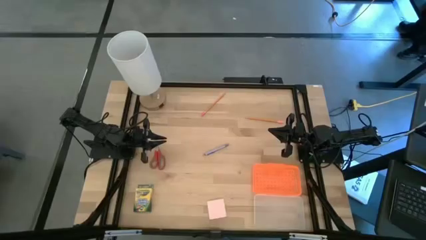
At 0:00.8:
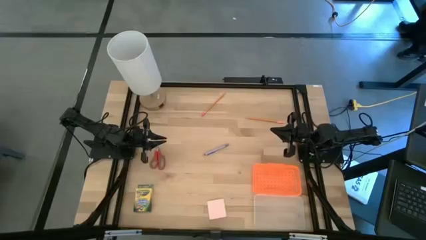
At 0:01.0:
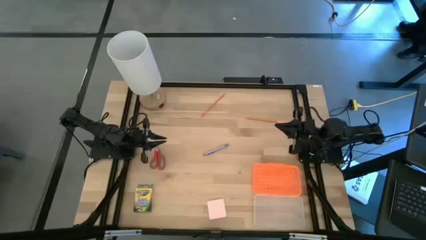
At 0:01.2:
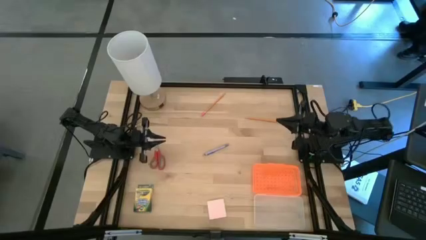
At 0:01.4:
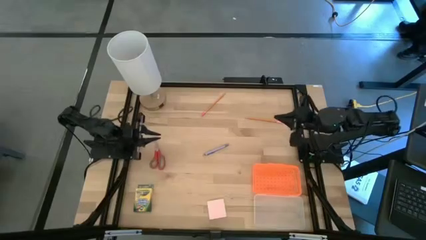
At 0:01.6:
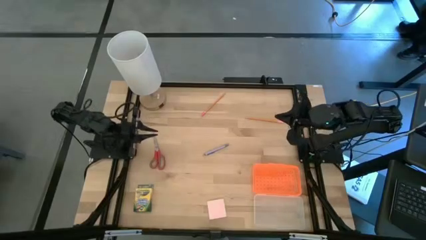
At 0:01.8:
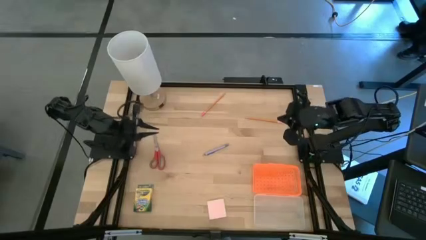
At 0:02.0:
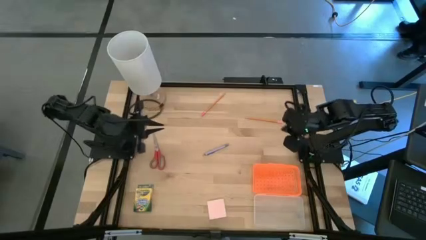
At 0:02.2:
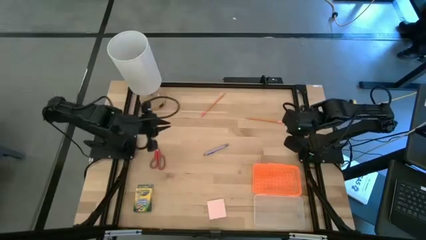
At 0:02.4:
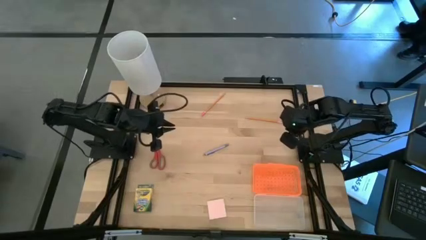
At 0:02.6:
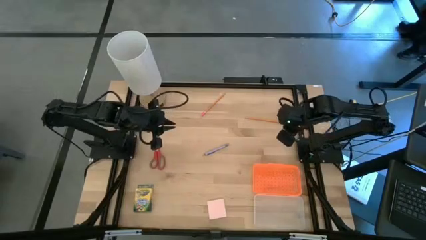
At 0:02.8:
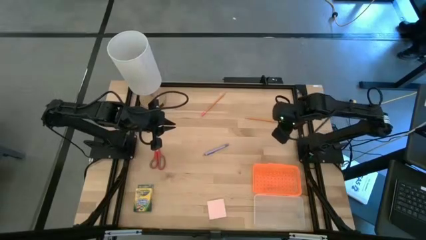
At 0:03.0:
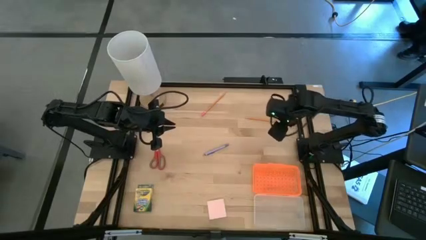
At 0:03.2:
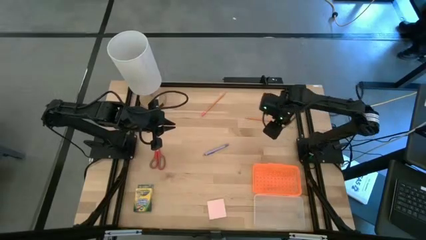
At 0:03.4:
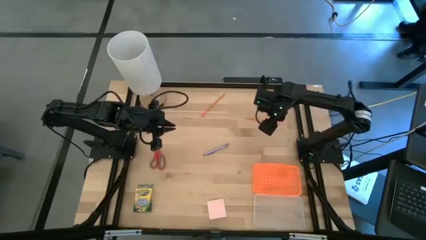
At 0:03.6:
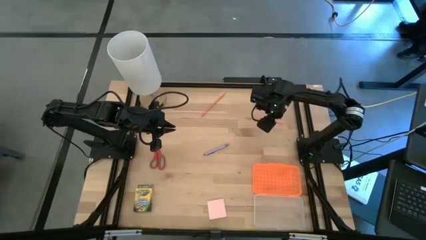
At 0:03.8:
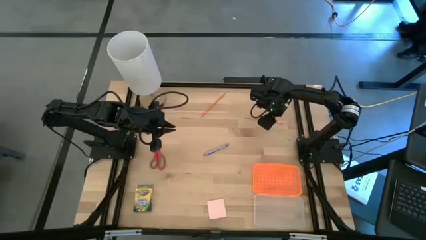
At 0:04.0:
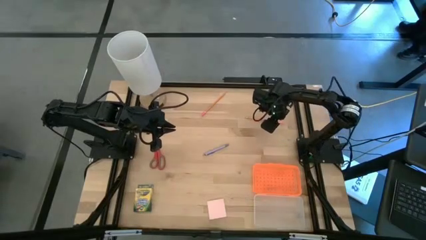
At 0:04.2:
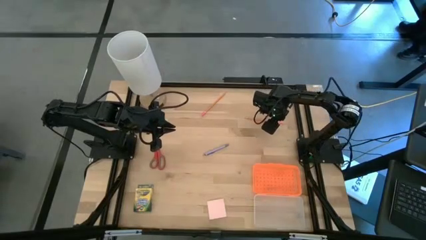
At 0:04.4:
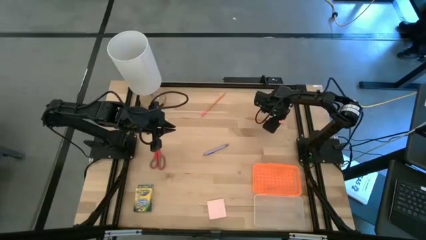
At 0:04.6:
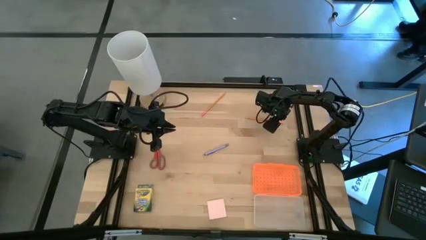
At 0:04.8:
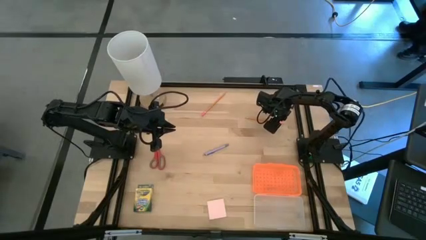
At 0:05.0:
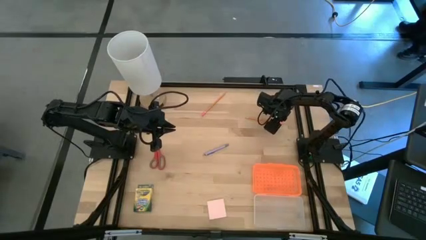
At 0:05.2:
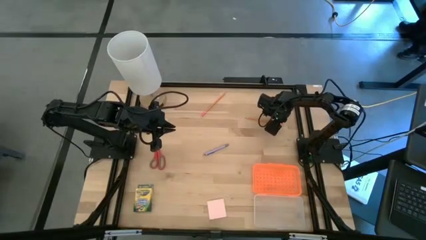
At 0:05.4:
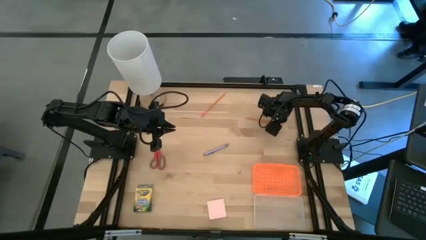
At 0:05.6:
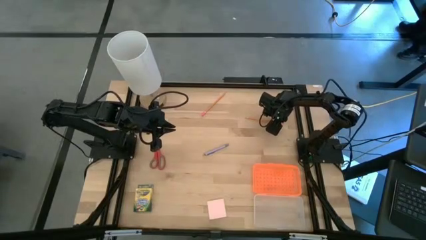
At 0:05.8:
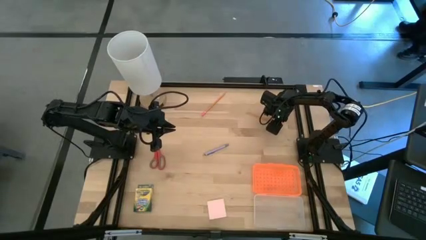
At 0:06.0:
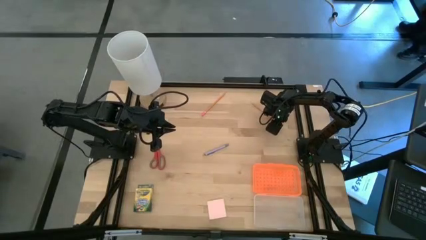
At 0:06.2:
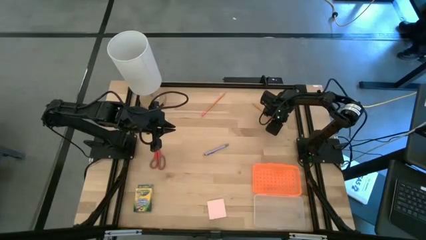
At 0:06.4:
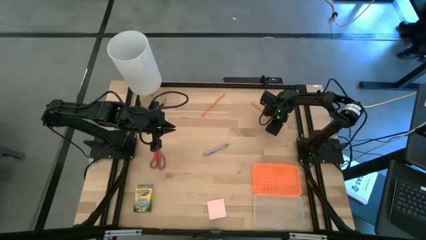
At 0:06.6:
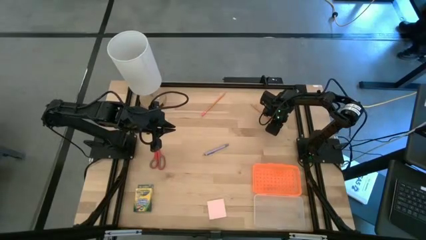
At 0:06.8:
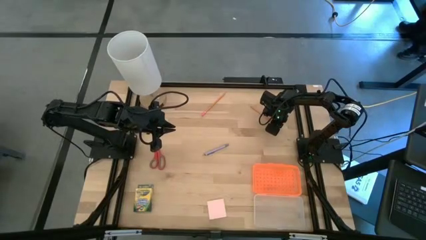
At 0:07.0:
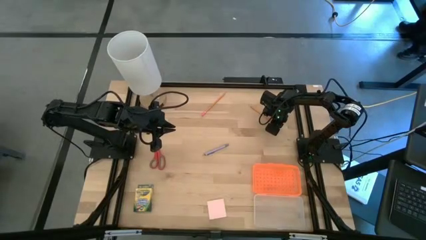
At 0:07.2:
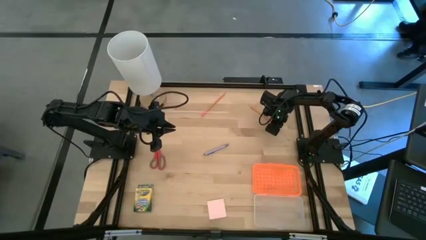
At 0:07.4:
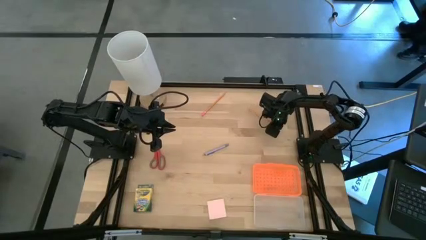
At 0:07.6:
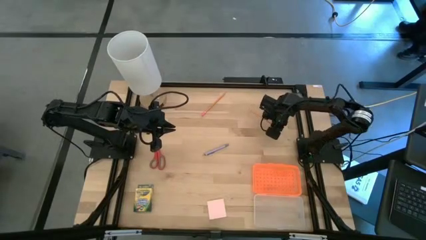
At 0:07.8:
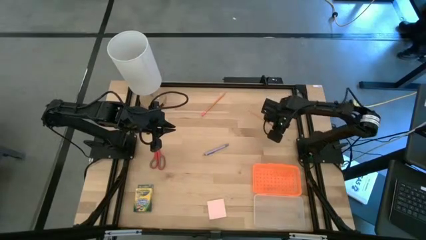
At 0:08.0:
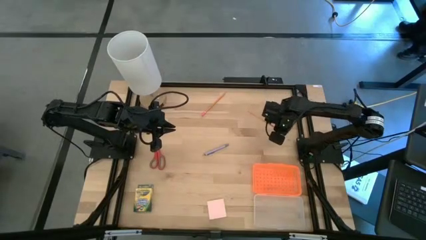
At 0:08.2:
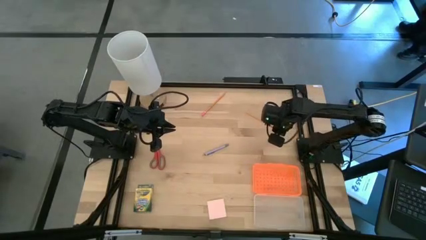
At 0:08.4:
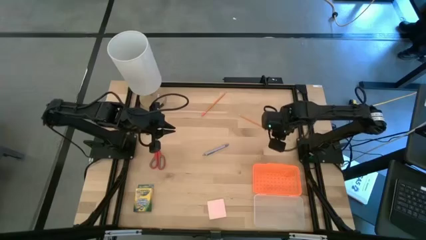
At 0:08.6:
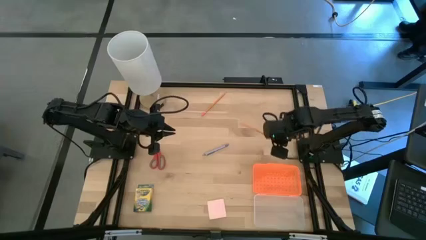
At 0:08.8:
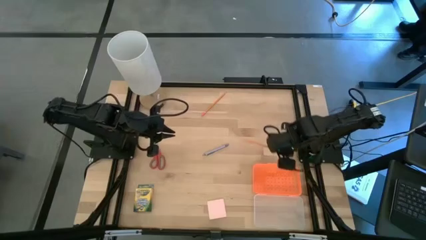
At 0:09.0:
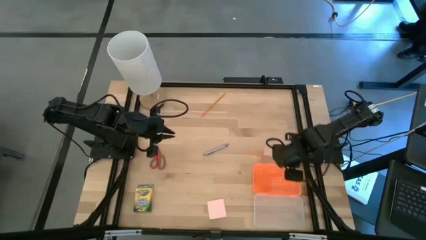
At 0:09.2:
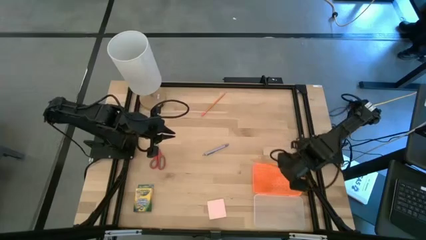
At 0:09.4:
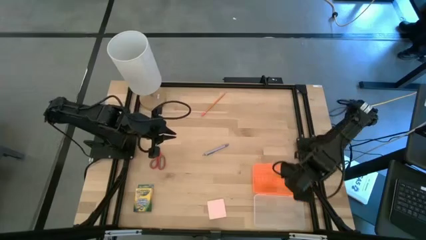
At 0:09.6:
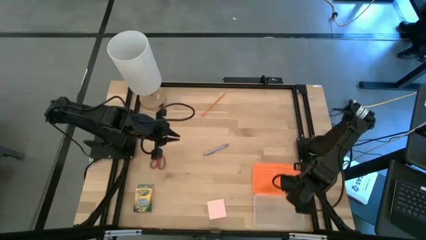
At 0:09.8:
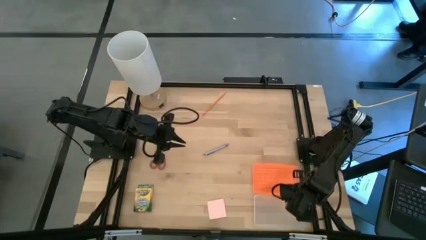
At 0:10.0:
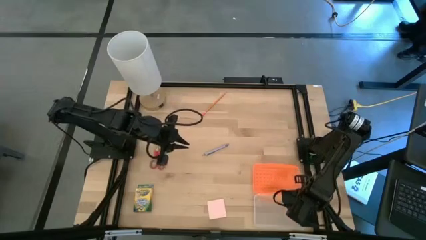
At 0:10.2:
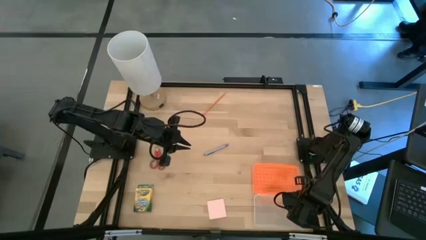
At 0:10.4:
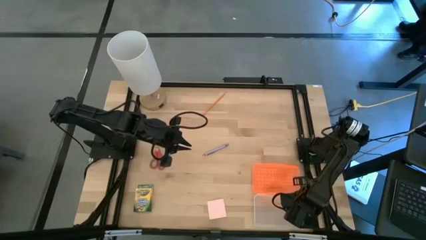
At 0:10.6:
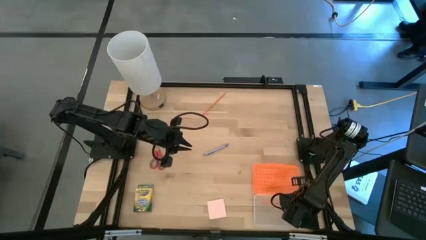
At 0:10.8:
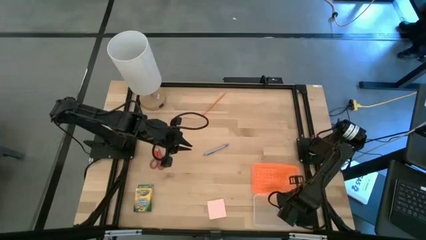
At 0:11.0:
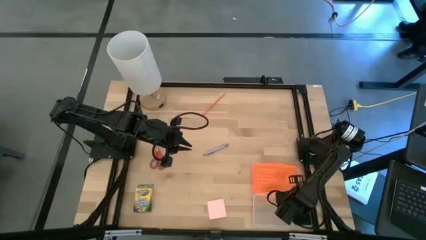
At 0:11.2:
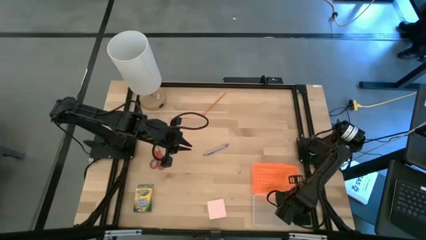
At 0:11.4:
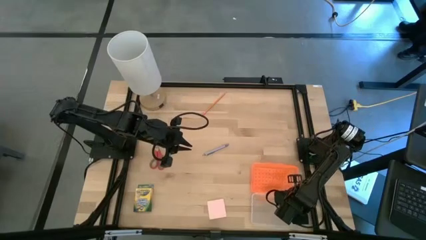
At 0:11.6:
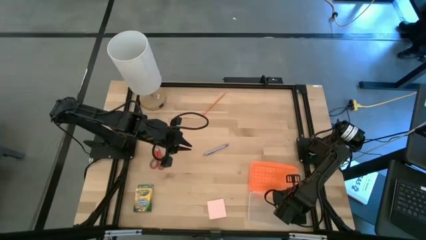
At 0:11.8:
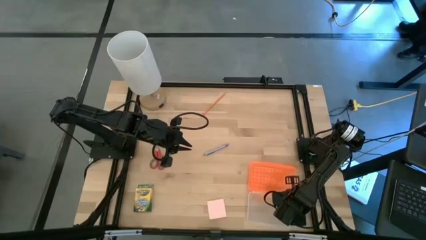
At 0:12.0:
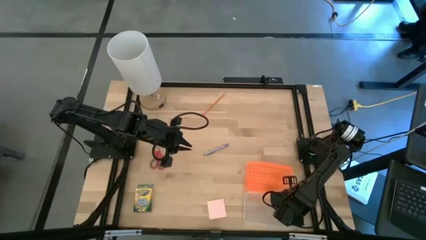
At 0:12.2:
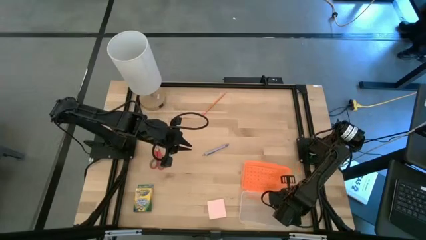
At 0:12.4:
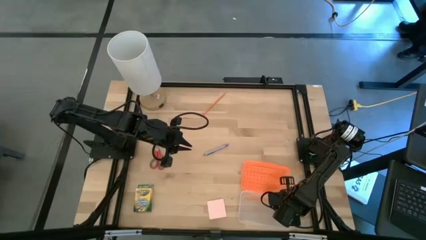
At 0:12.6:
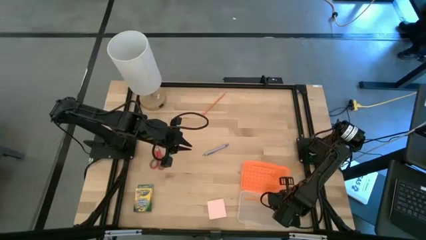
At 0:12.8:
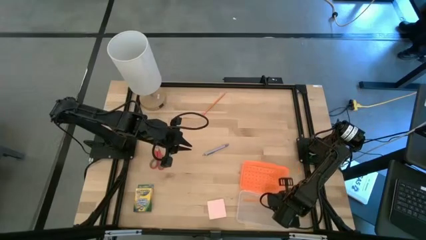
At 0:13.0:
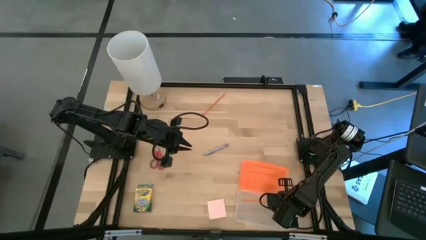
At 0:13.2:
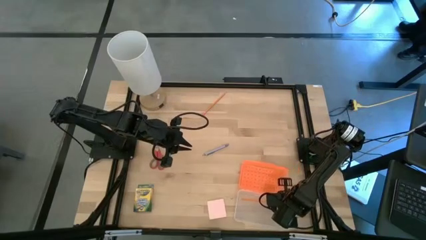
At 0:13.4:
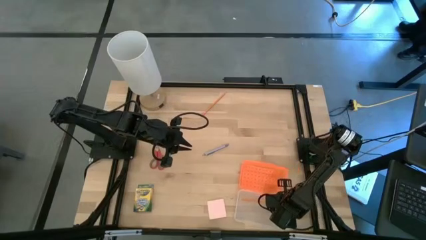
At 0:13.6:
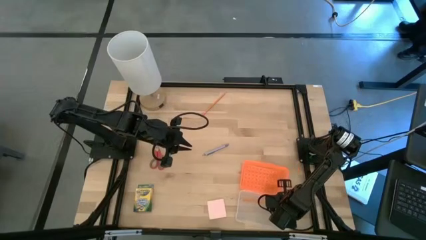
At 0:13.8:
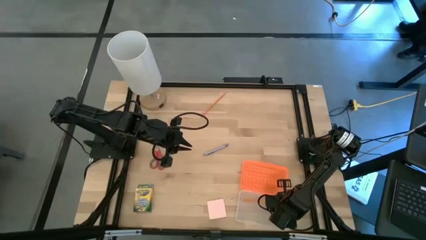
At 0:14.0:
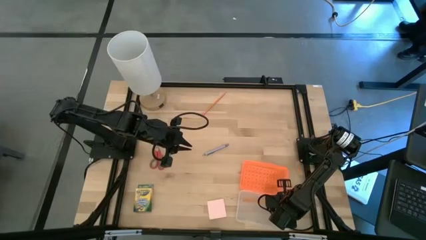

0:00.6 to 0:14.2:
Task: Pack school essentials
Put the yellow pencil into the orange supply box

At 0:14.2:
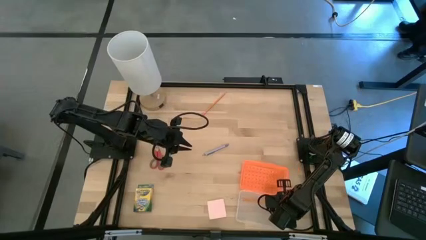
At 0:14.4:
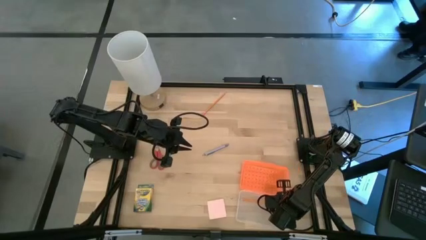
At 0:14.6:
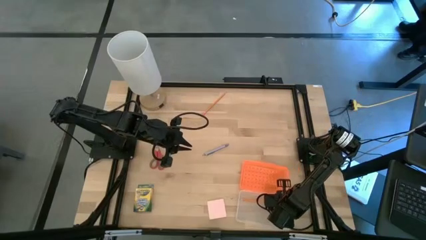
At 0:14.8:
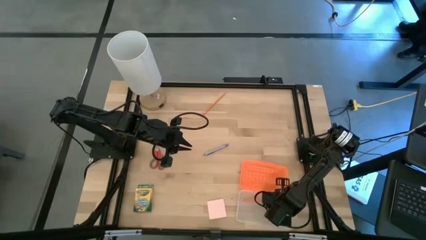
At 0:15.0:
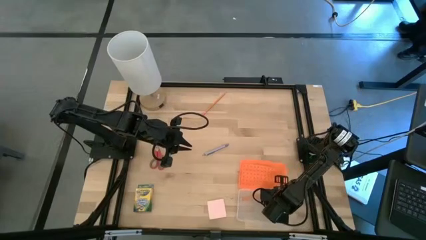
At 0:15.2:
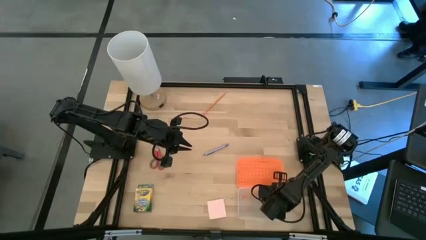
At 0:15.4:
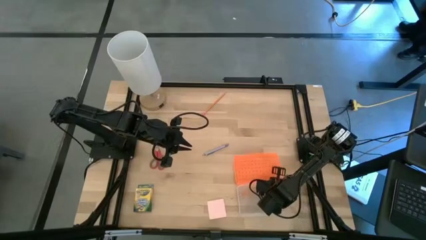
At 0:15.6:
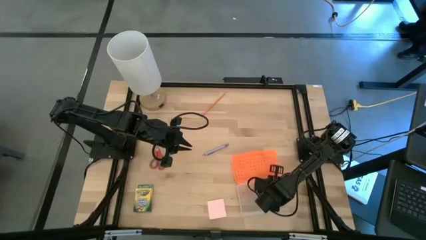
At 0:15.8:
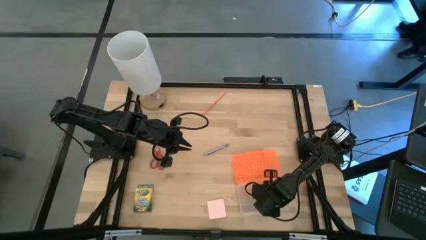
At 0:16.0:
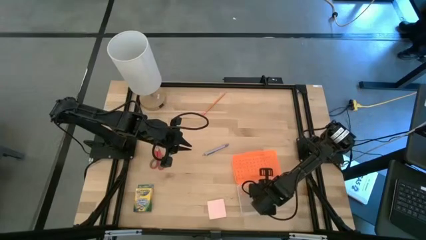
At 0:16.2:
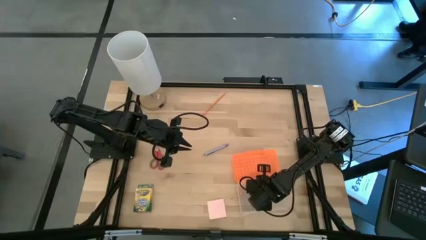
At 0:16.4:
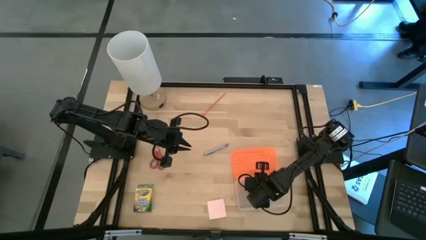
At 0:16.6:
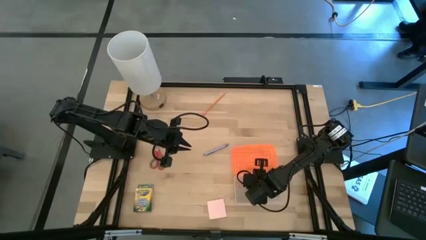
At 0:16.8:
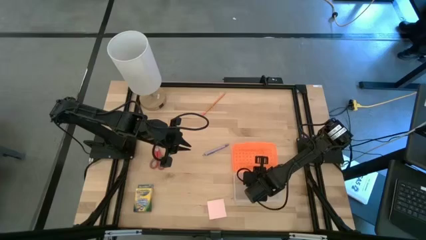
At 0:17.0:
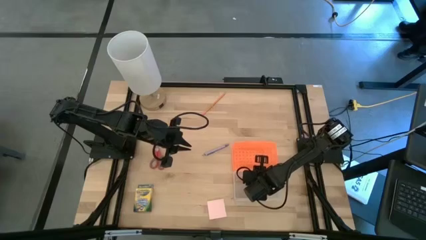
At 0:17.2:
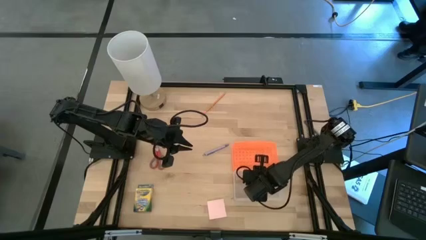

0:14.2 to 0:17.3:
Adjust the orange supply box
